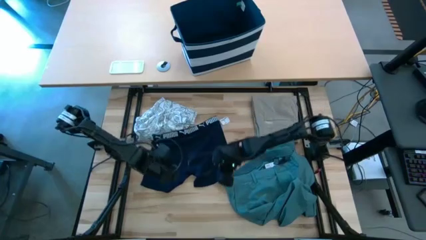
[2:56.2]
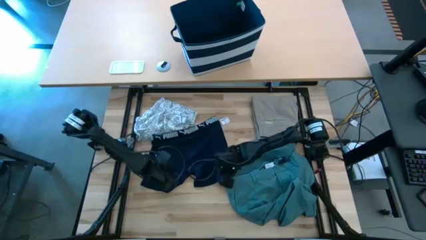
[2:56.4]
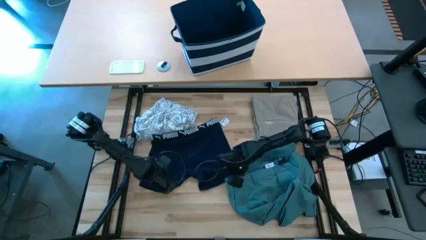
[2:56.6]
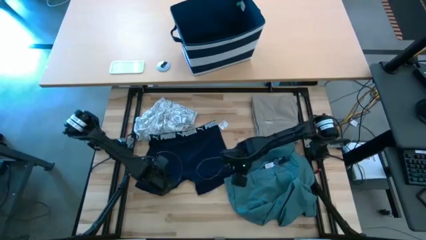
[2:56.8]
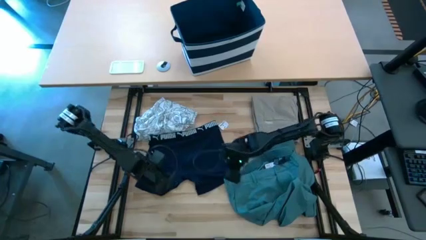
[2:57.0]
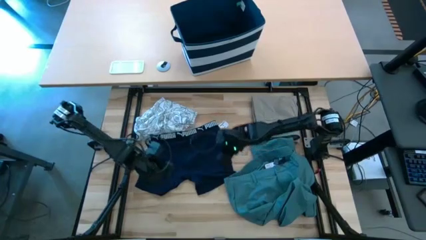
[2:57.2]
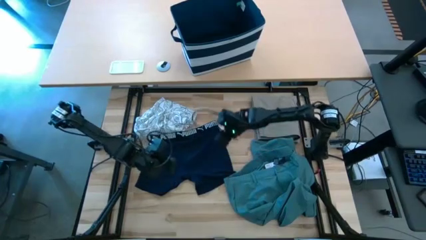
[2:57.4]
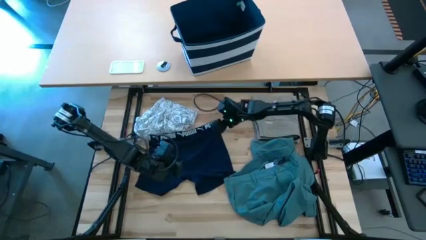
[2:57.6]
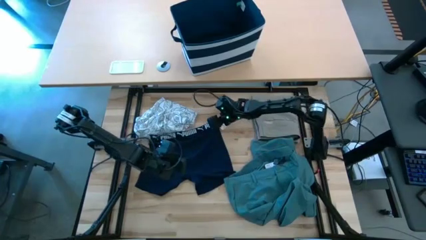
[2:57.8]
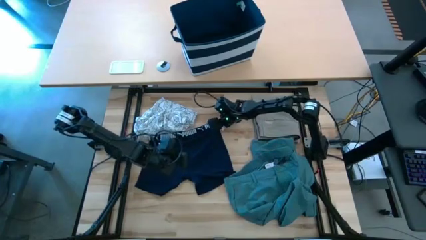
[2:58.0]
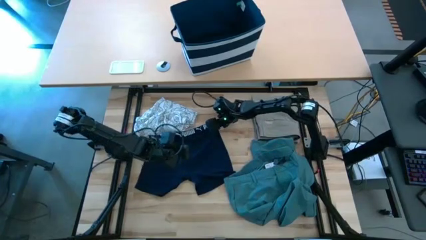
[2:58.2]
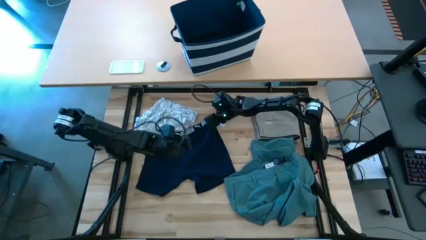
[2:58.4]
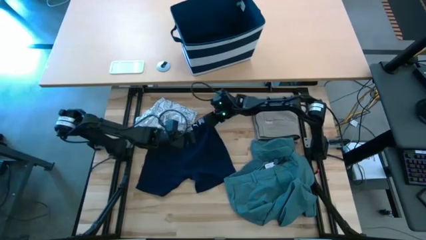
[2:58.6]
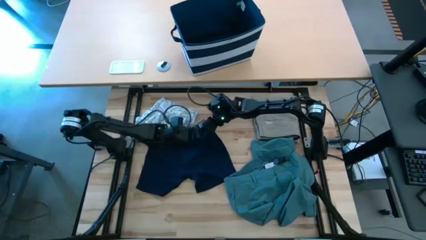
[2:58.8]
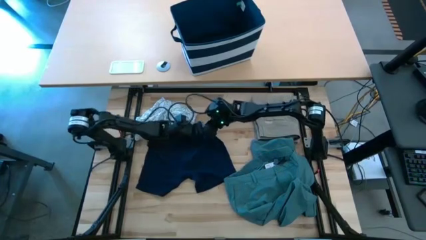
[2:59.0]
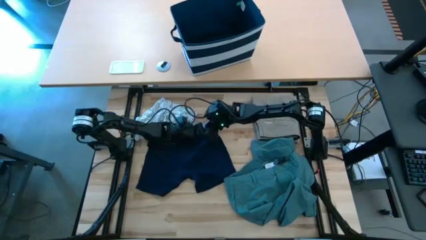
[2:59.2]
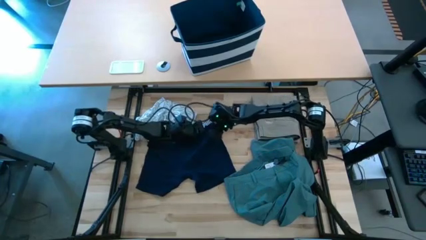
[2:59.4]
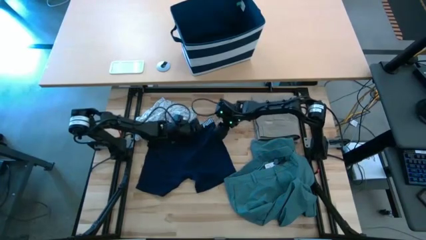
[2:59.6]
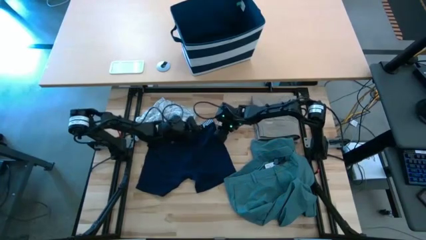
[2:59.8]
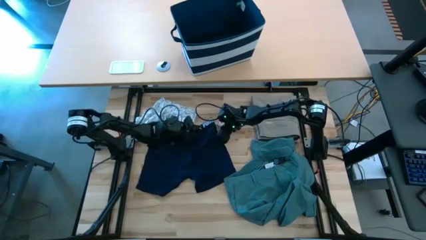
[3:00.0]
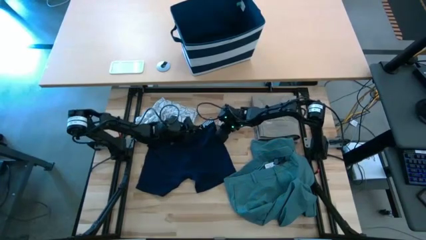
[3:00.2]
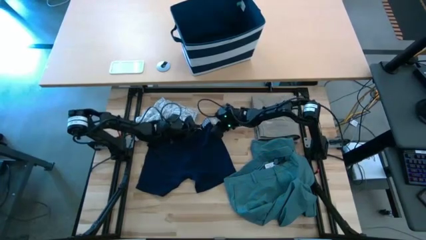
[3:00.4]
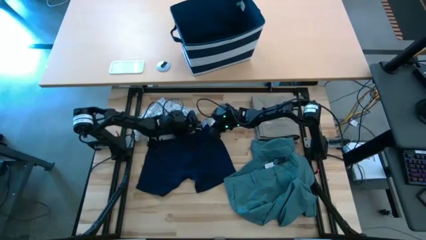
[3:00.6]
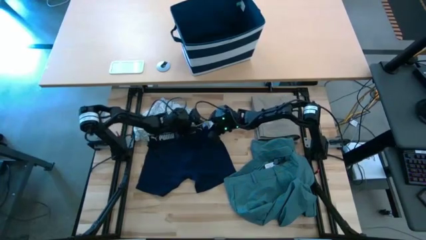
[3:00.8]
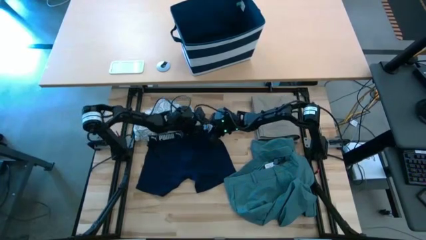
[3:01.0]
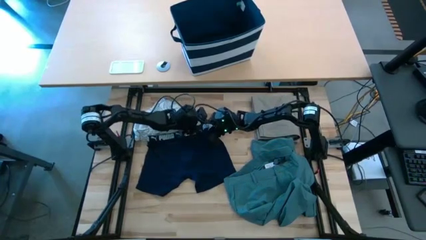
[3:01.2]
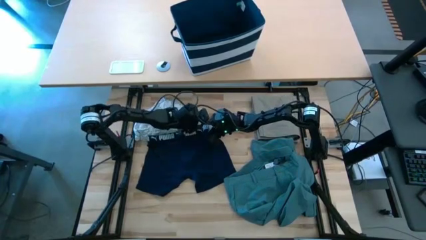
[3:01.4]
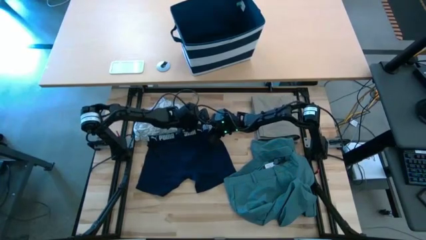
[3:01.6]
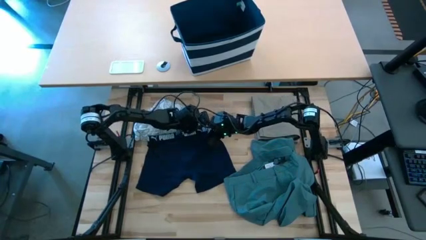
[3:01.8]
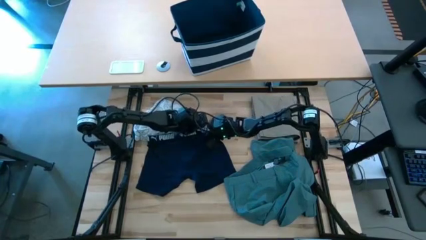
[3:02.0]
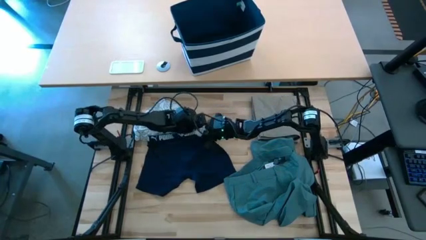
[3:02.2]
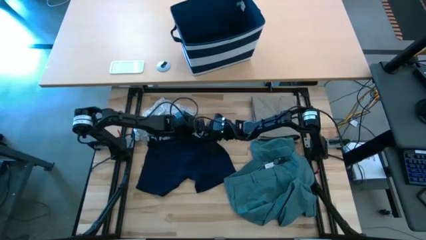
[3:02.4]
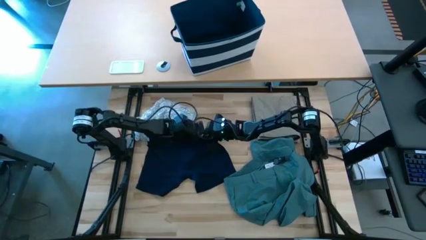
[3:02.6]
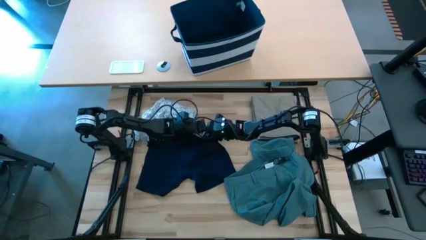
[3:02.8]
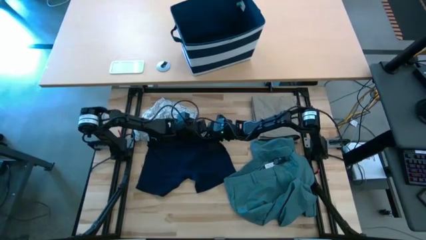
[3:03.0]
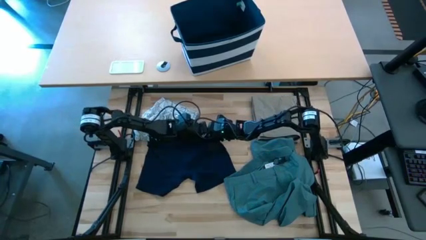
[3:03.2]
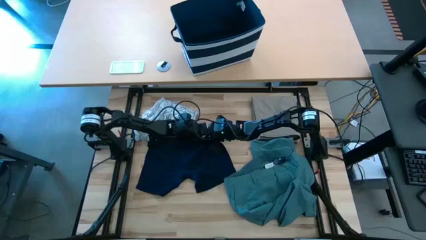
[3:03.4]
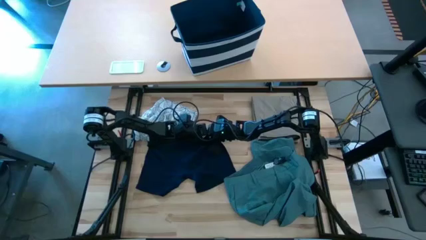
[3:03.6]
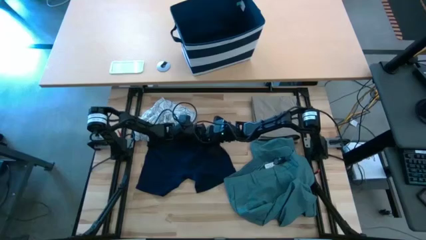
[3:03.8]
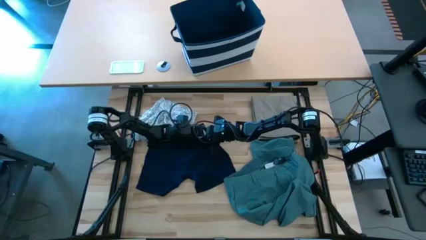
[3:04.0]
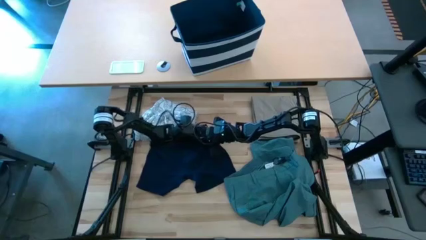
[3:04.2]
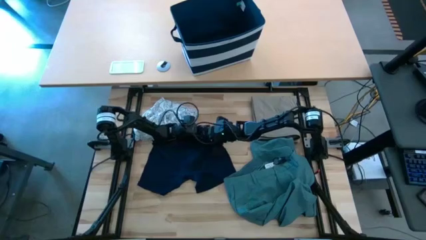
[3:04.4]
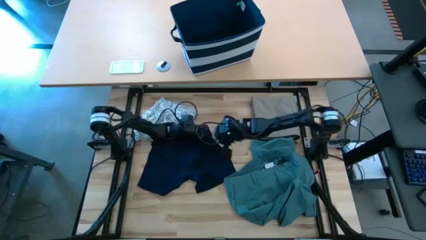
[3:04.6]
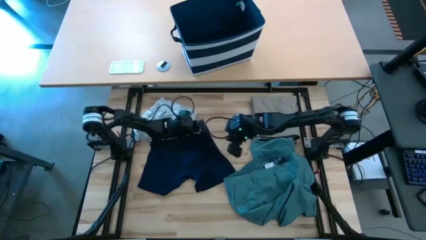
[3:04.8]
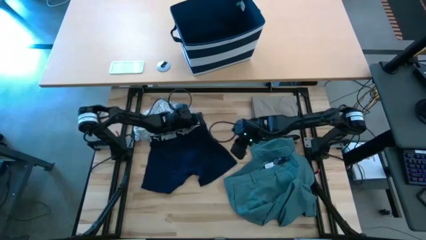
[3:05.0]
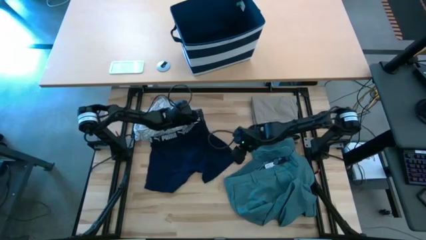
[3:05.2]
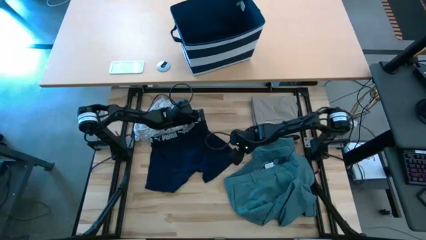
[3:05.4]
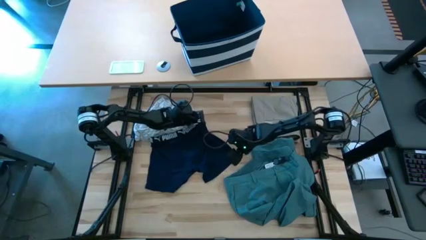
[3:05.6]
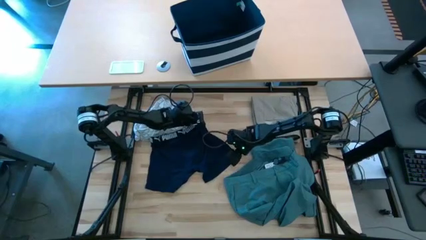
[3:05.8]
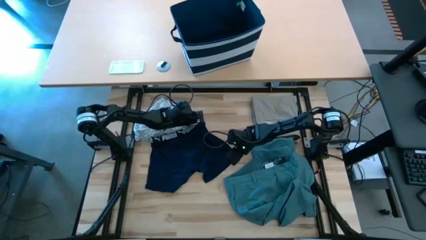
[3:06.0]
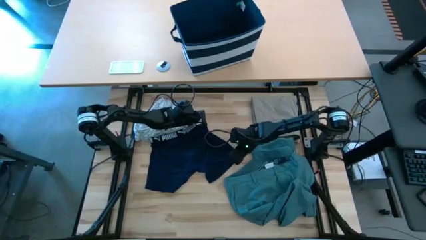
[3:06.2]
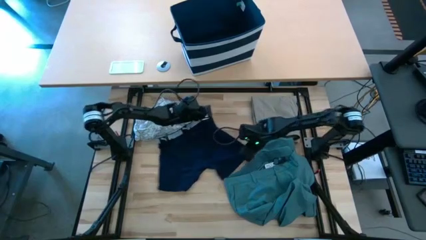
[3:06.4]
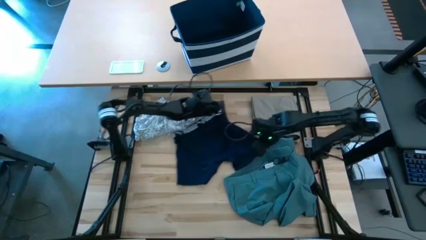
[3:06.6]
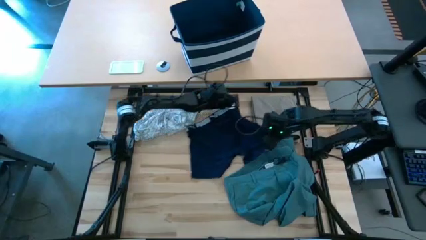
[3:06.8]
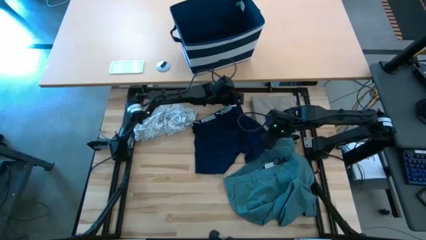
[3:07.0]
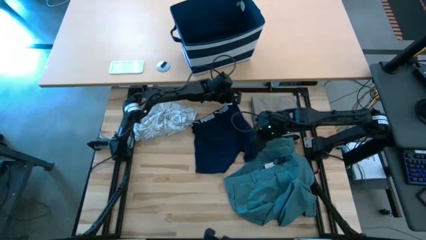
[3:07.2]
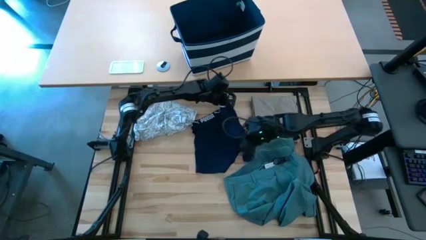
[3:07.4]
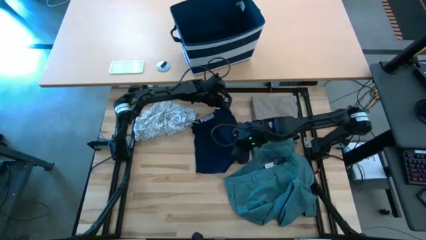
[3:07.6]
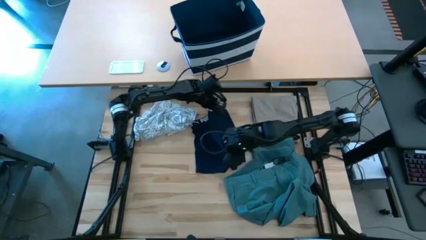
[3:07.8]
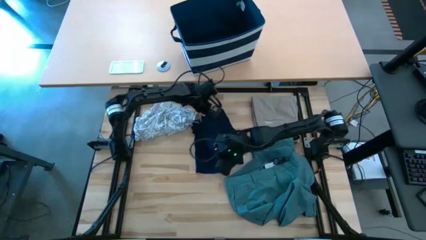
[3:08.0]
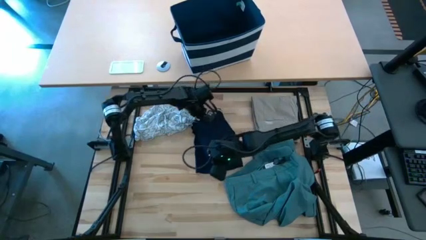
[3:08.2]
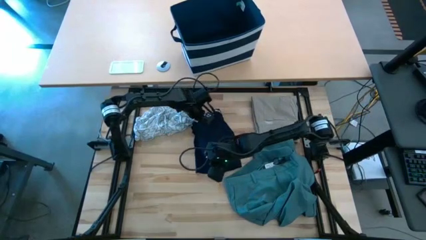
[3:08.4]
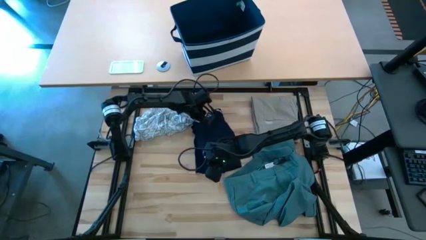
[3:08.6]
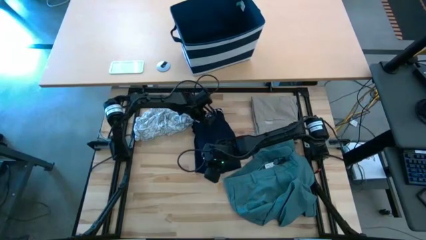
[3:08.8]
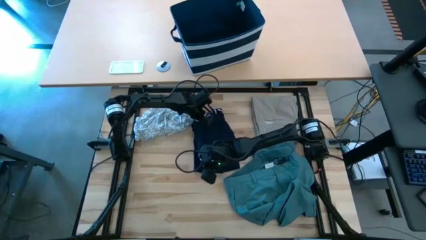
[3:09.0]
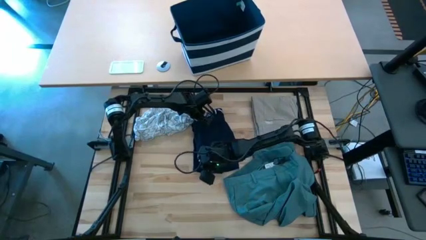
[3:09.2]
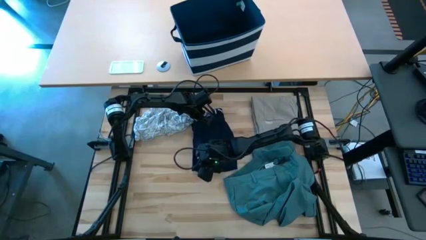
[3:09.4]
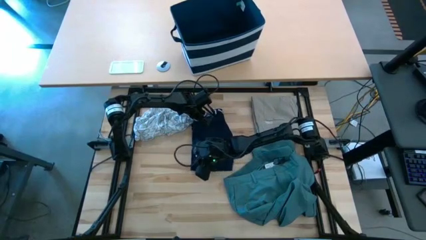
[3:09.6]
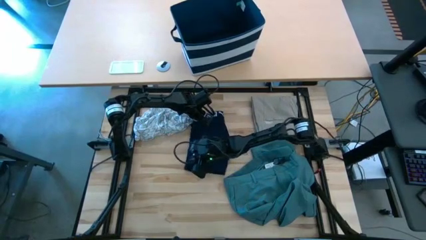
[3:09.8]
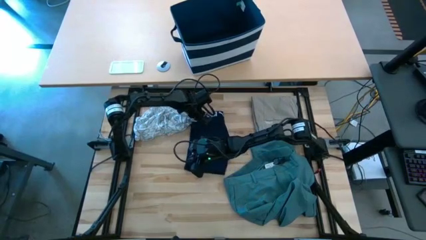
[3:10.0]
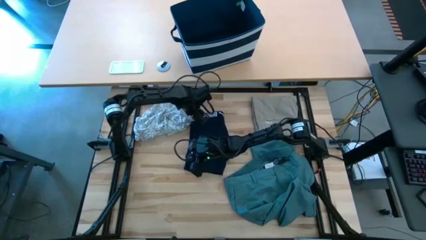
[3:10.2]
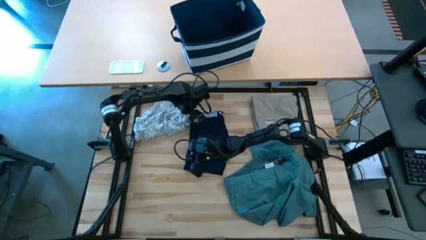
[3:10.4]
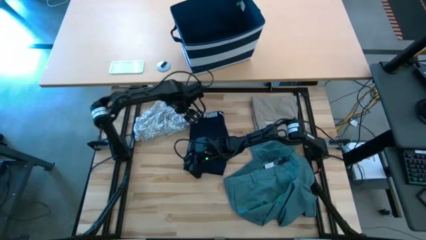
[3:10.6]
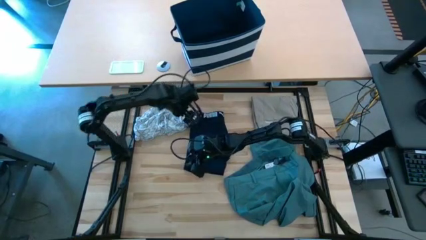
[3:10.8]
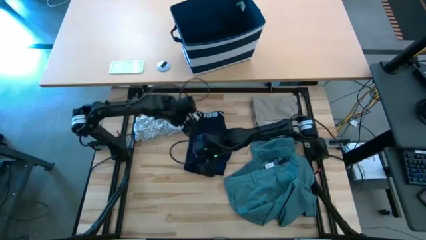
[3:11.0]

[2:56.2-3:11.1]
Task: Fold Laundry from Bin
Fold the blue boxer

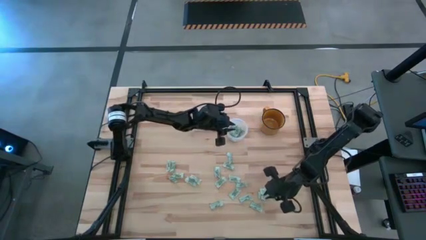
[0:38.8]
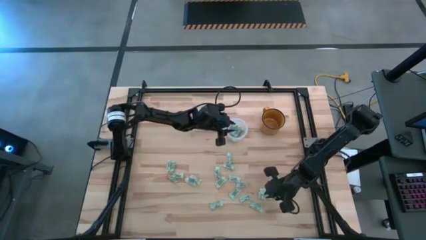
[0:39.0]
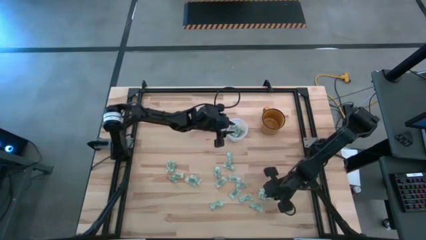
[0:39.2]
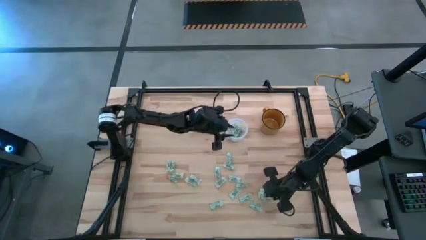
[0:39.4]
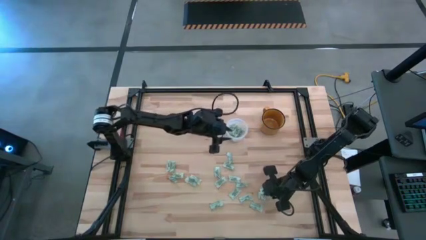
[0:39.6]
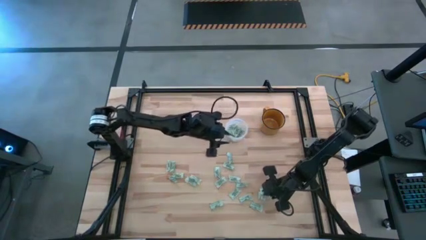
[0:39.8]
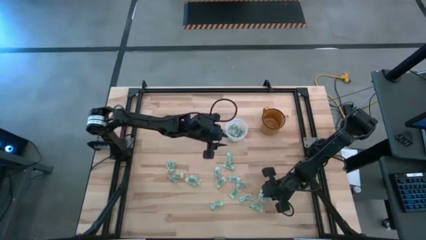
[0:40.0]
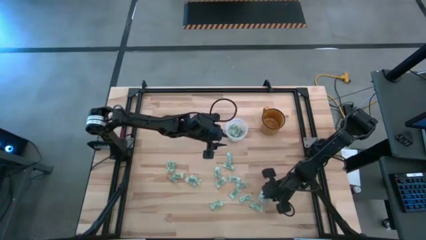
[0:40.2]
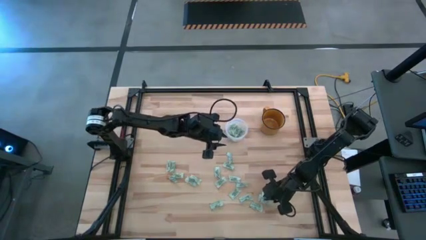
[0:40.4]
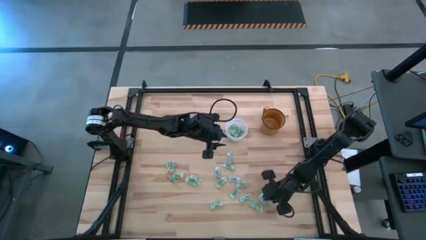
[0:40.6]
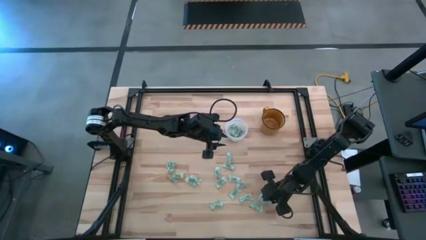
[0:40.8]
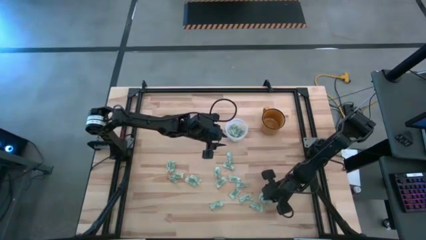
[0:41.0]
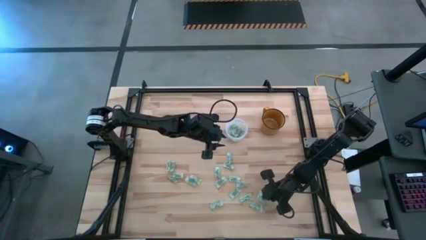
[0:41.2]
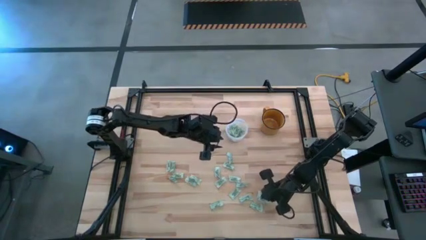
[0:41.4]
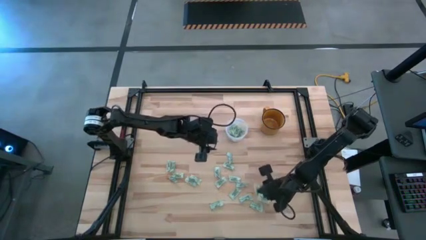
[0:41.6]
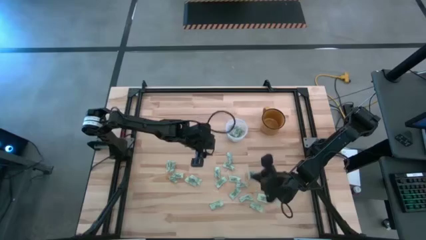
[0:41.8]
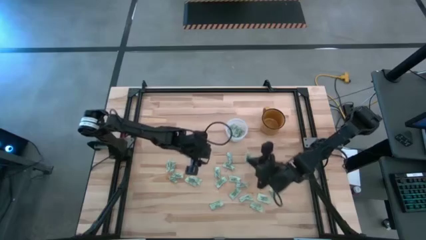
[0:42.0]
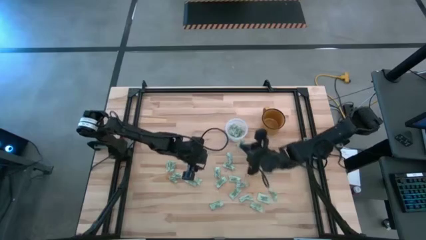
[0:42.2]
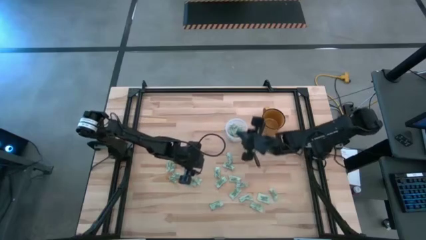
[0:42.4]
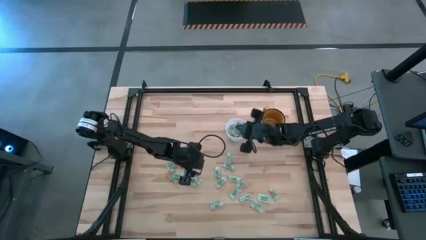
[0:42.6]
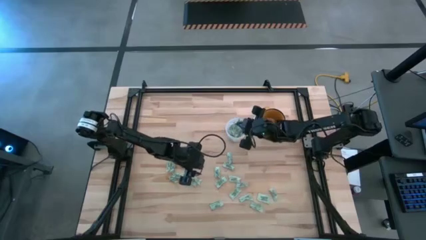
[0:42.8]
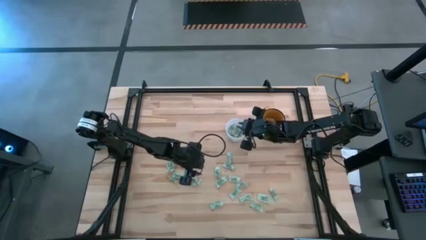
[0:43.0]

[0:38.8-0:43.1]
Task: Pick and place Stevia / Truvia into bins
Put the green stevia packet into the transparent bin
